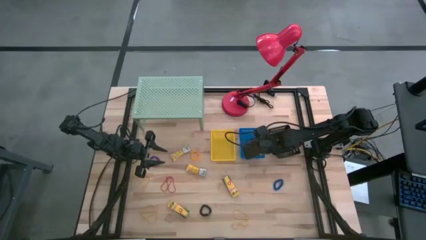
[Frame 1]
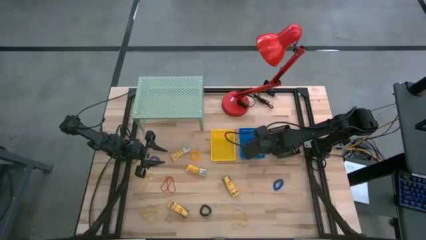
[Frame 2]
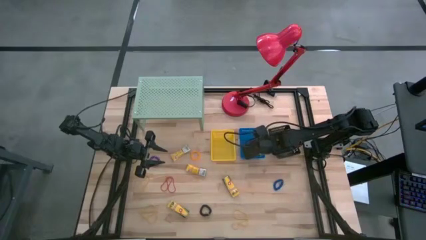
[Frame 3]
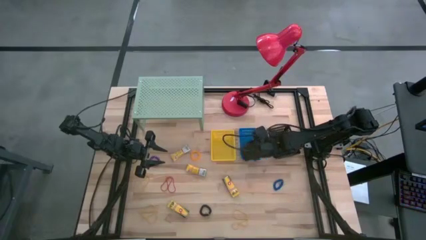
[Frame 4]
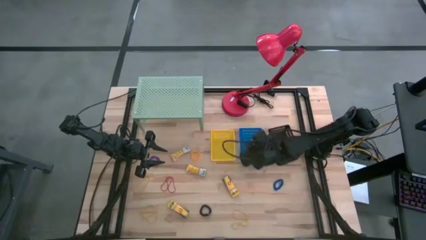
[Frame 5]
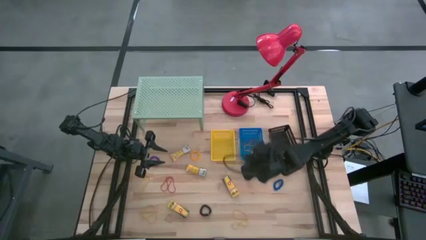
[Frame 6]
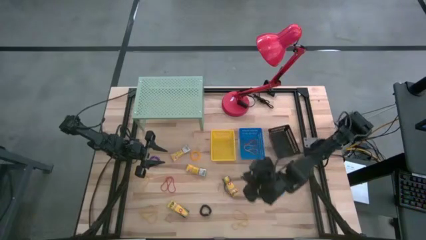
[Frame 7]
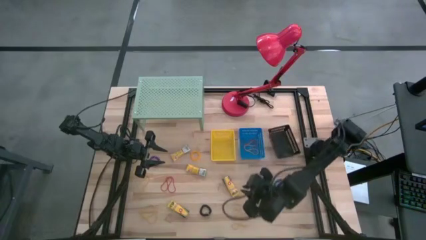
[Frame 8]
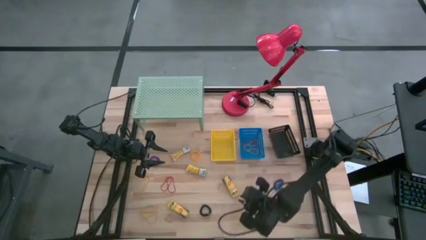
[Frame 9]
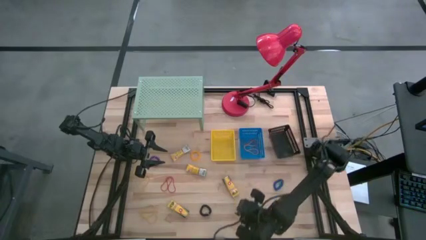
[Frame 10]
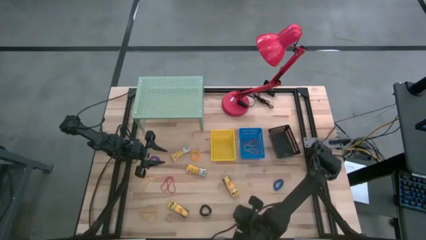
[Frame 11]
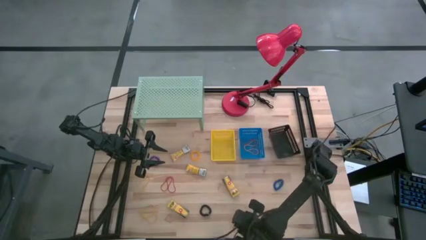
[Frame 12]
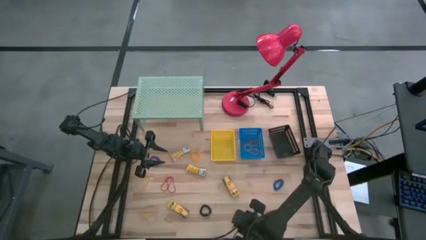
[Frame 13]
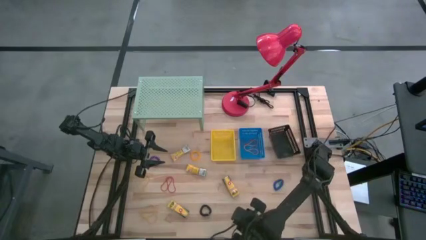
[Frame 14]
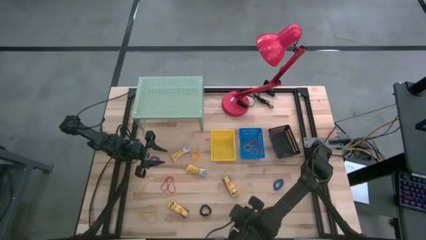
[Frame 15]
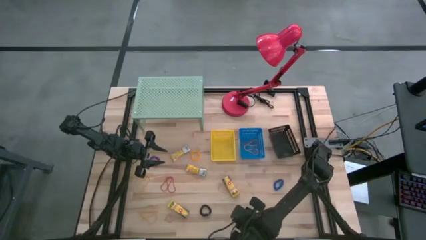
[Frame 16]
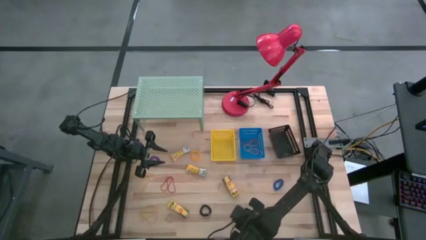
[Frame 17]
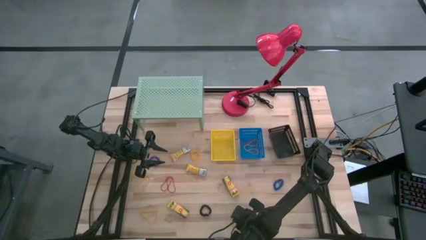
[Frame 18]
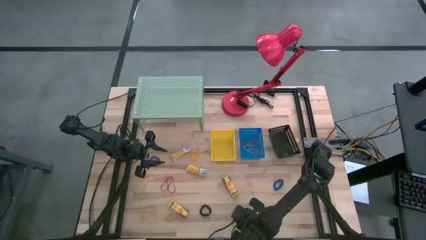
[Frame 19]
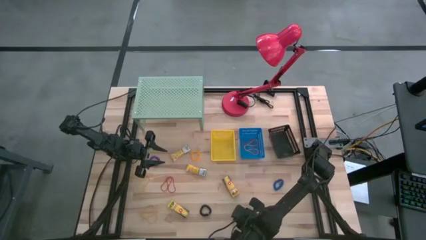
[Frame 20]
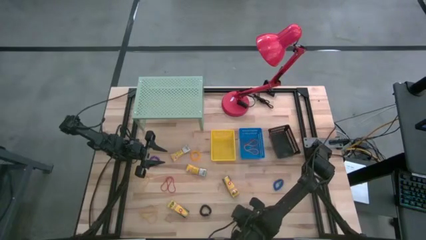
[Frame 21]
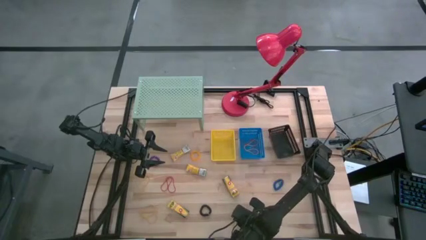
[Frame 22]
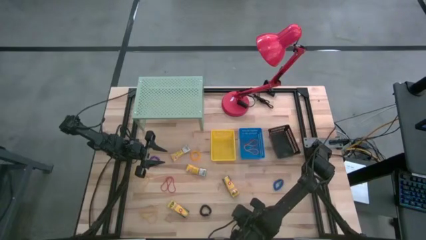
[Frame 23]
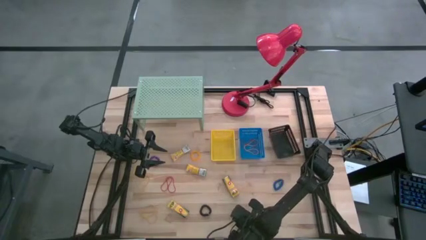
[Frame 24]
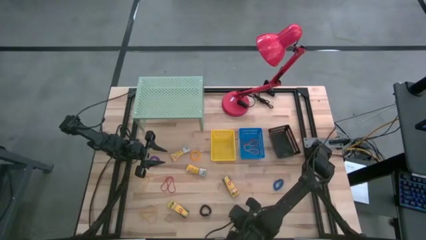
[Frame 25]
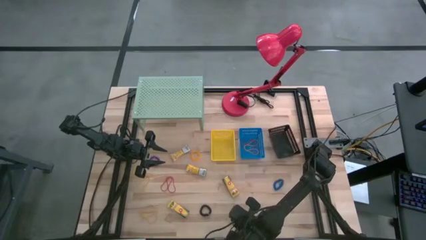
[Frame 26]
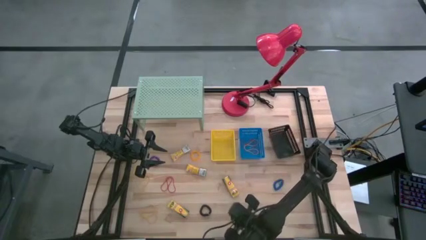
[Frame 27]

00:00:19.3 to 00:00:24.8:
Task: Pick & Place Office Desk Supplies
Put the bottom right yellow rubber band into the blue basket

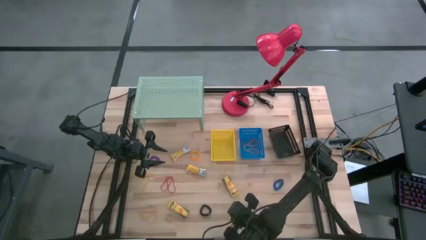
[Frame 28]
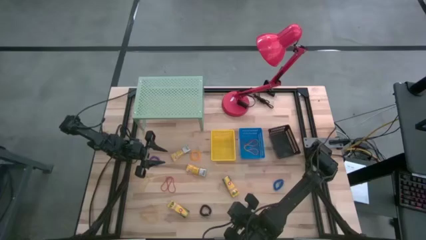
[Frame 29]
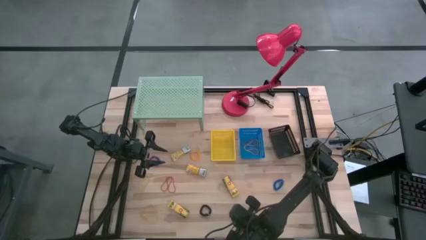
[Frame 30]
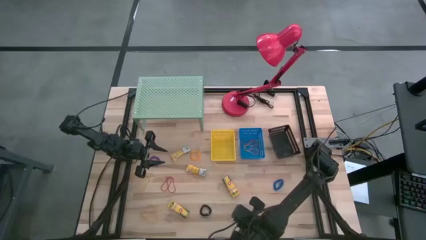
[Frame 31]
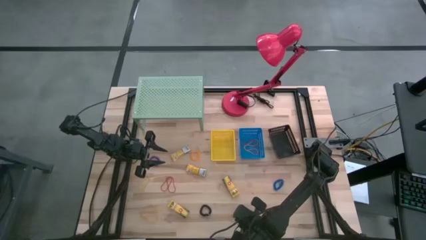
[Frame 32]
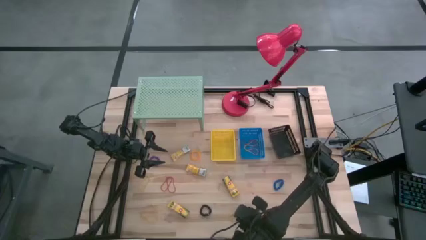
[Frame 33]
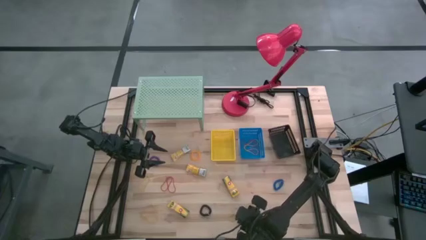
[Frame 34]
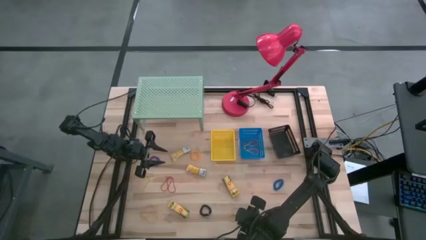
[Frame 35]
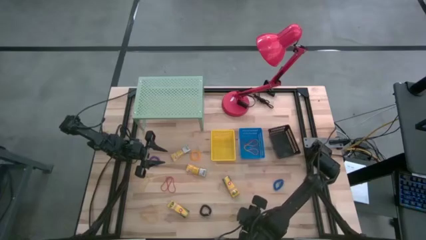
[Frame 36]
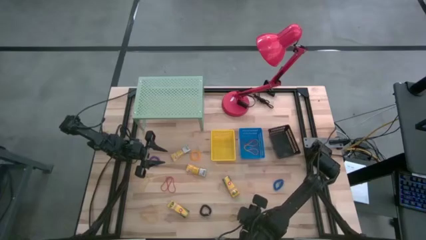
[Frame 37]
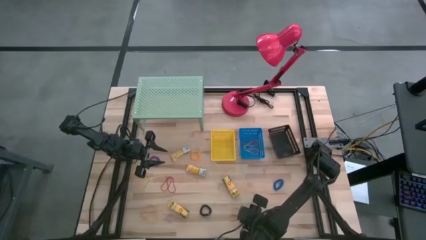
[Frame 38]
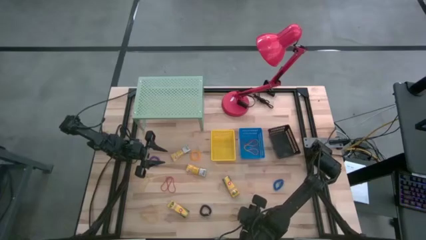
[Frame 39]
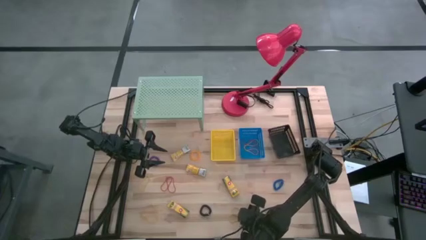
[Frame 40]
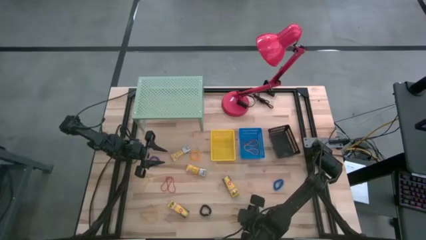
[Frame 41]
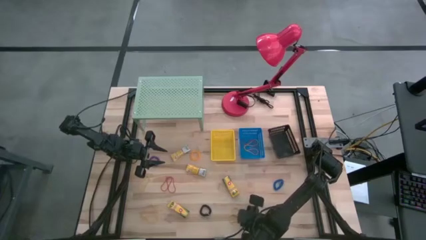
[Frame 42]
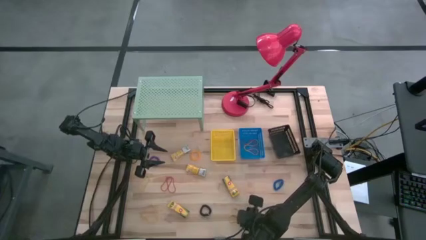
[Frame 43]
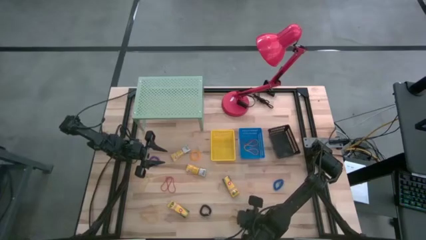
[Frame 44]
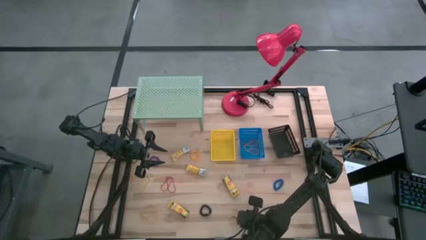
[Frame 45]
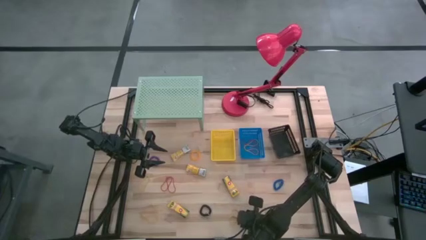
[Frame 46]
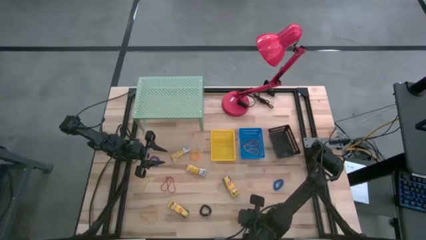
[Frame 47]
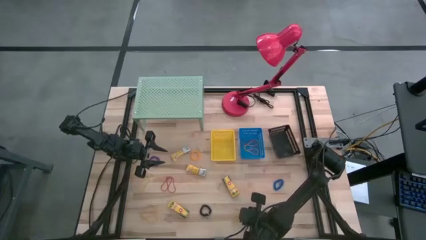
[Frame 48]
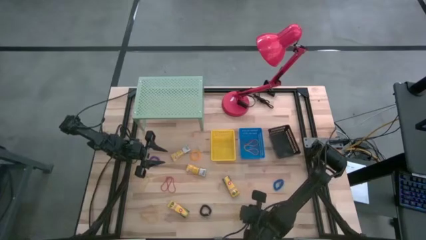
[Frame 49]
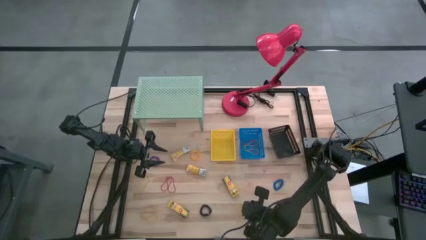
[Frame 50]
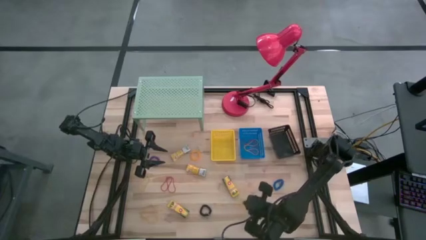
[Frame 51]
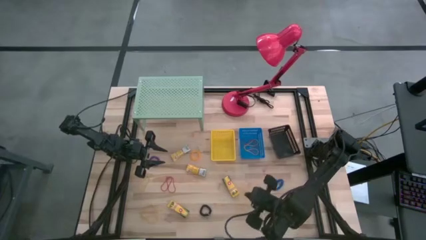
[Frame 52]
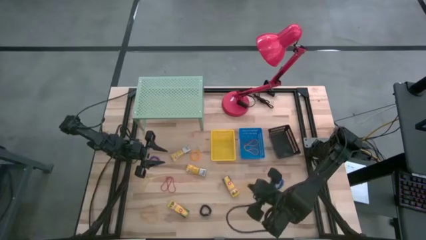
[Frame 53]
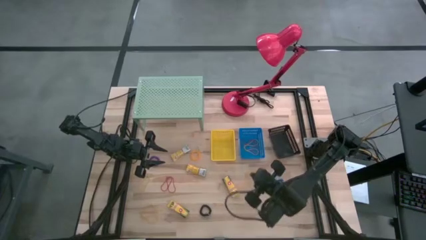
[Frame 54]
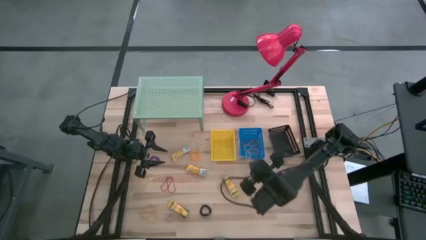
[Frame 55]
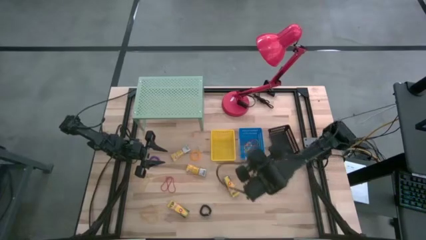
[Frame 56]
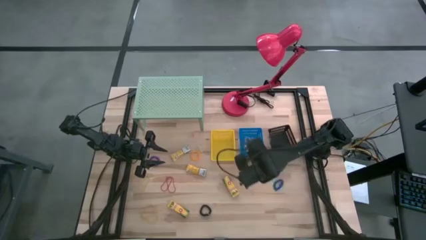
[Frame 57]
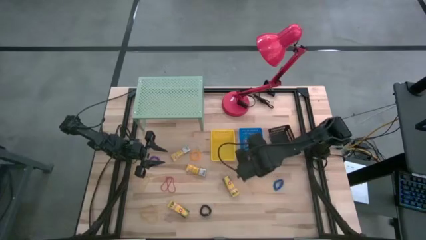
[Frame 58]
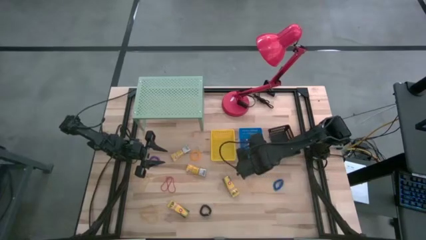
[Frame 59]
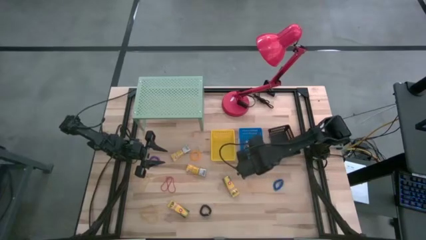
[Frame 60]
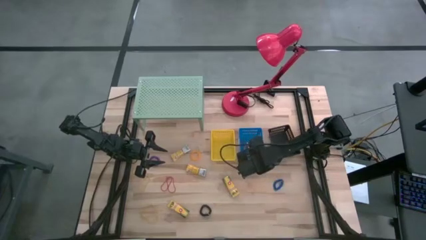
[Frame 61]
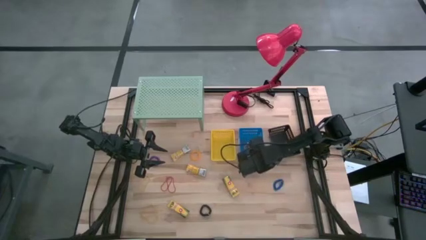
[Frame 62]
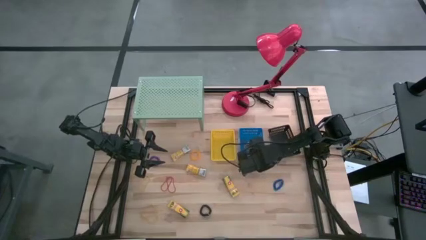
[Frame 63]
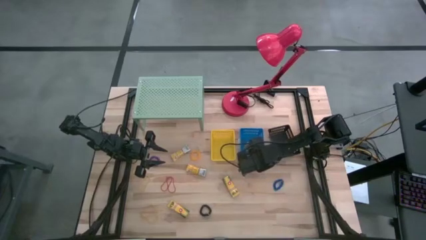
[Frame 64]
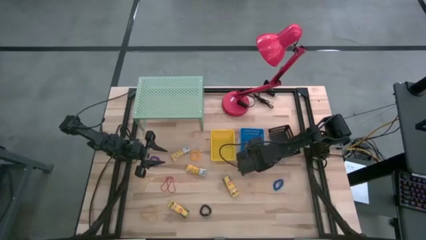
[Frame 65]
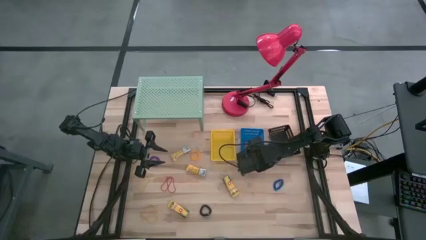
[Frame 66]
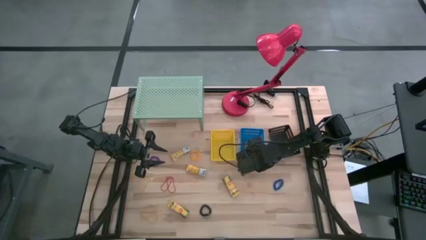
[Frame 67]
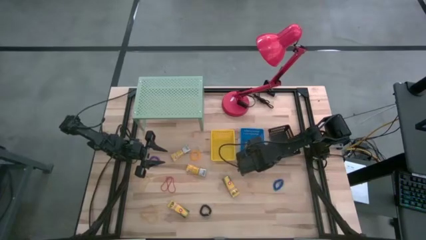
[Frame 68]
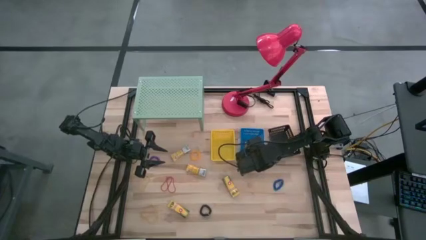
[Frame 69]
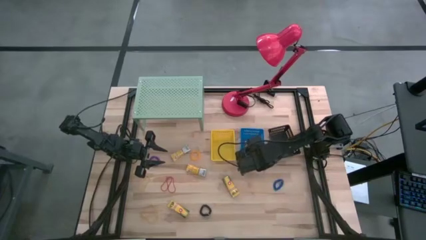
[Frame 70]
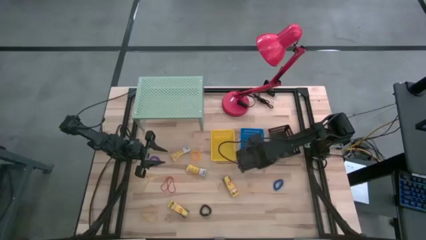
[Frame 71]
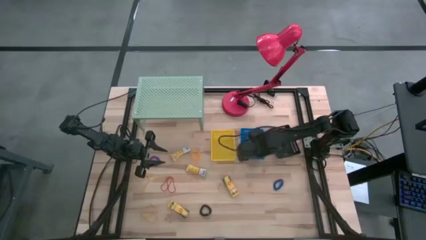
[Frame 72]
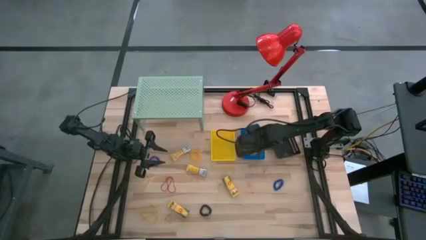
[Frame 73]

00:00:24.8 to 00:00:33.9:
Put the bottom right yellow rubber band into the blue basket

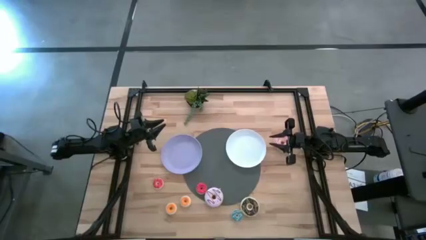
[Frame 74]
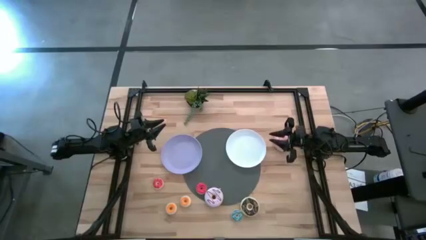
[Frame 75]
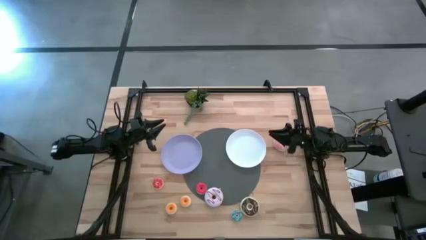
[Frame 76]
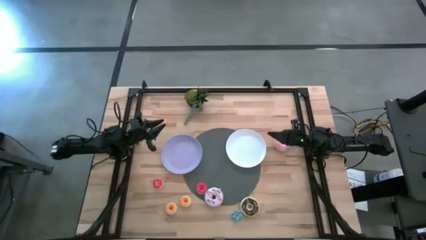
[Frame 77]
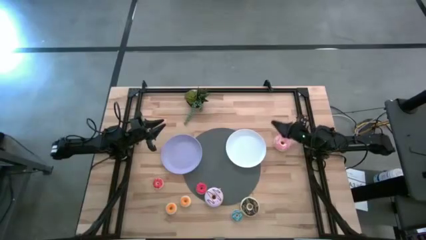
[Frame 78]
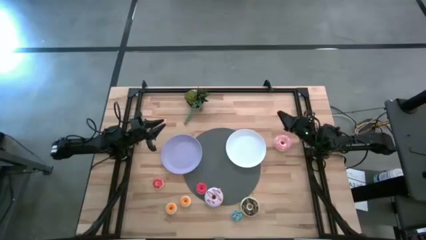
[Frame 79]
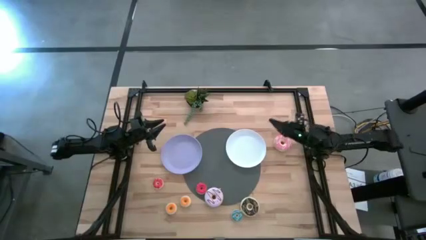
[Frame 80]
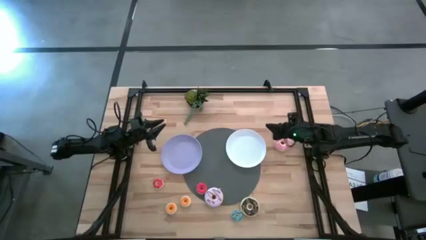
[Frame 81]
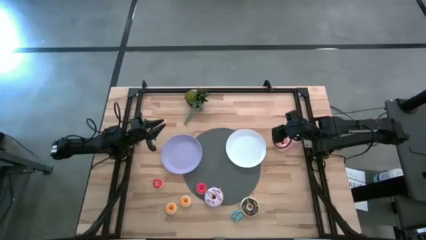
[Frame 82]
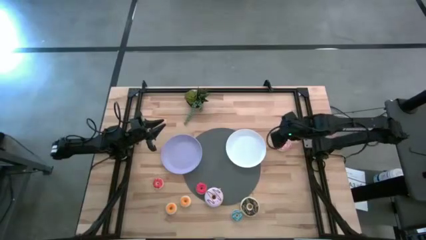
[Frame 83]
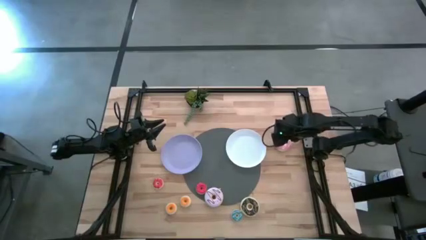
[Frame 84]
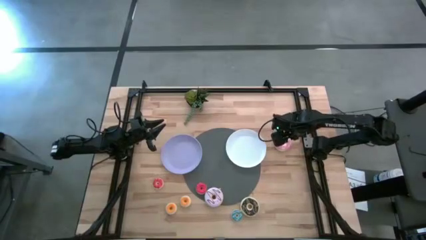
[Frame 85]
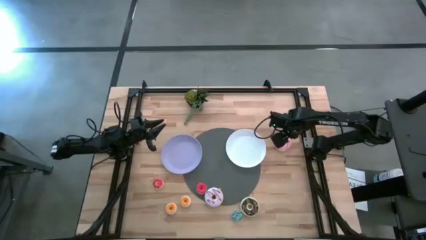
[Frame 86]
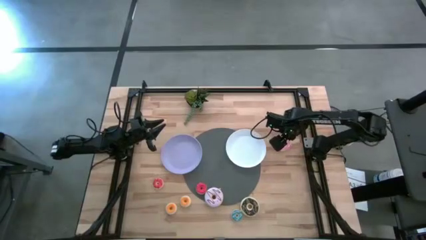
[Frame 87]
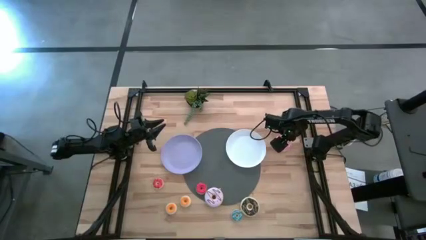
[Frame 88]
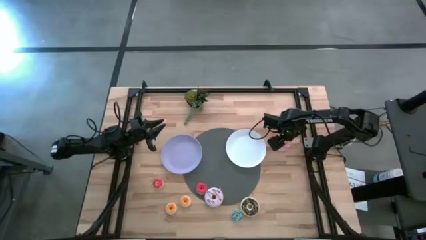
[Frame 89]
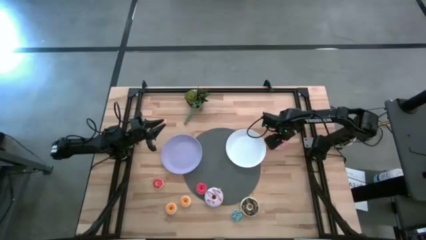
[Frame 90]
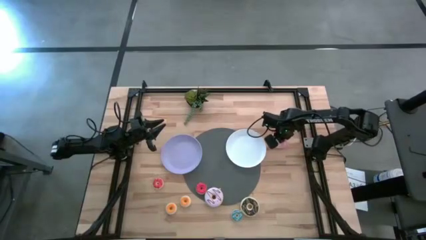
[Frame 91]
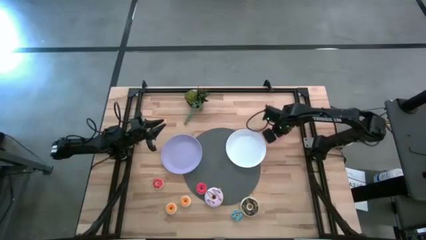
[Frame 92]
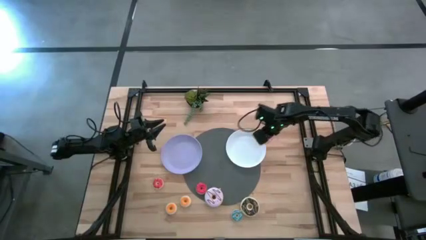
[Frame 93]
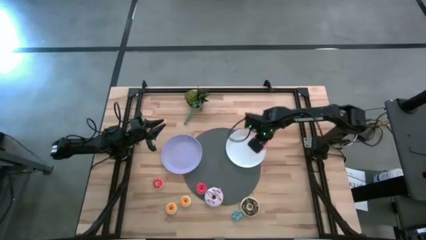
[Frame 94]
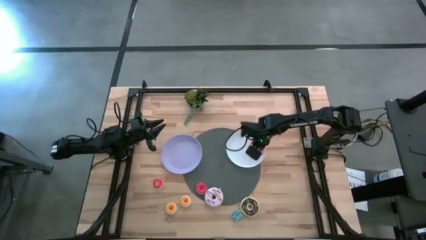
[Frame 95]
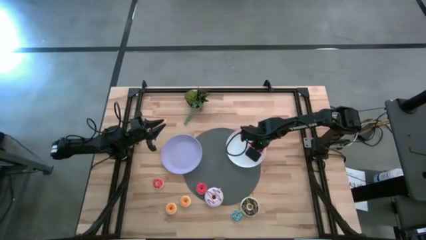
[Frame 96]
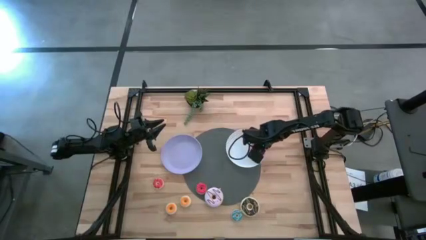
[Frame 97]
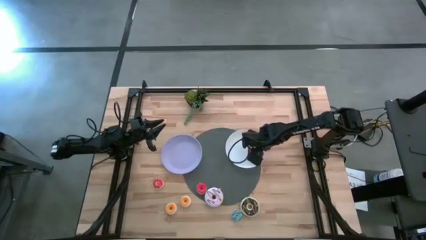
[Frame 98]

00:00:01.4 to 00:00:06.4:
Task: Pick & Place donuts
Put the large pink donut on the white plate
